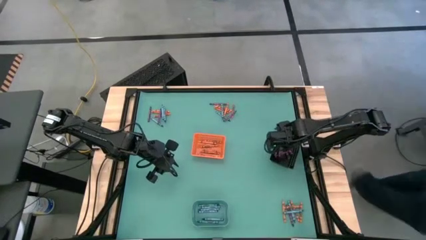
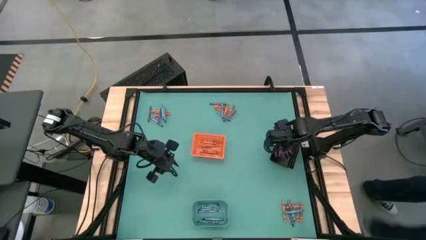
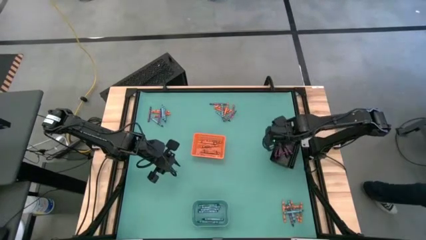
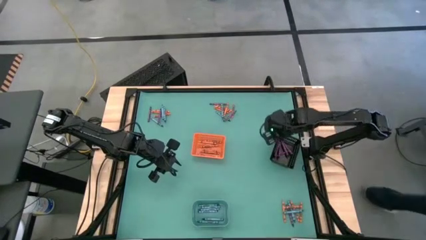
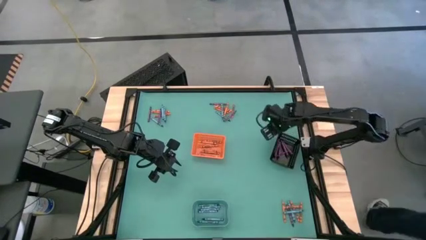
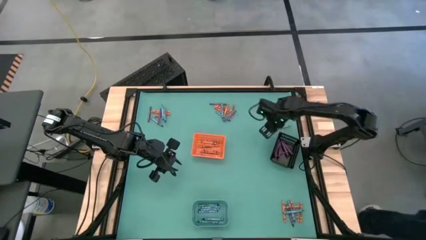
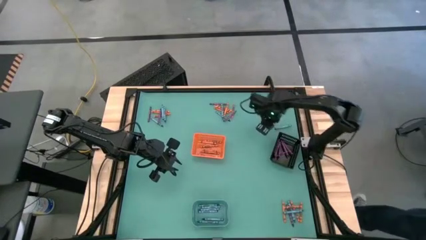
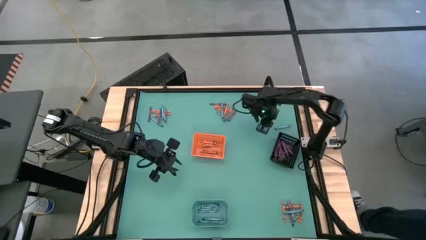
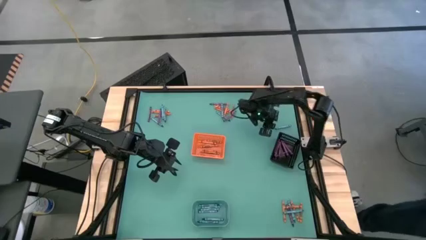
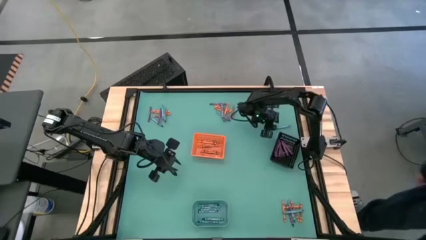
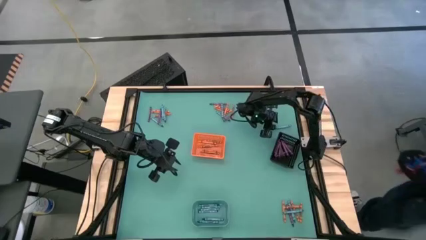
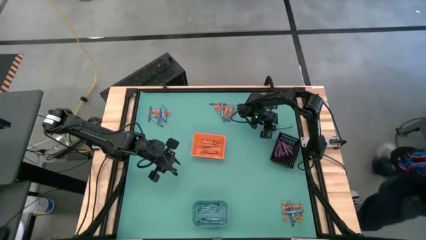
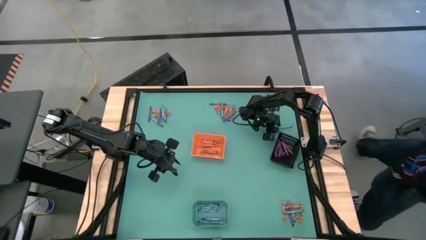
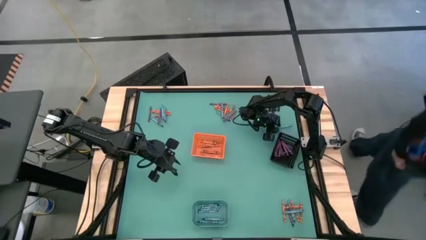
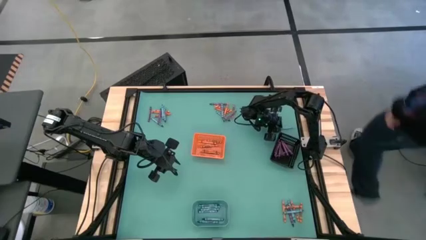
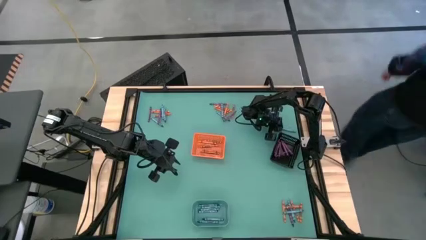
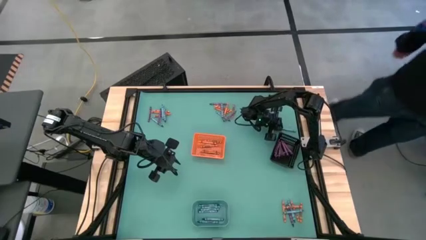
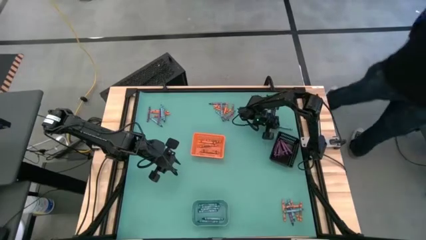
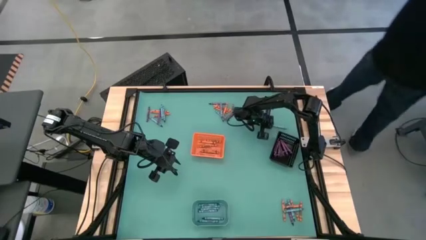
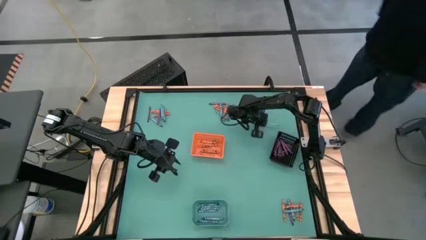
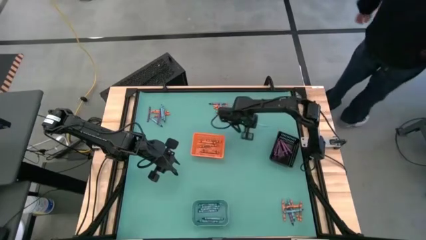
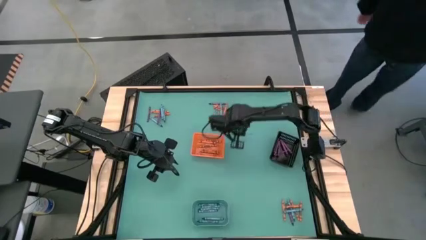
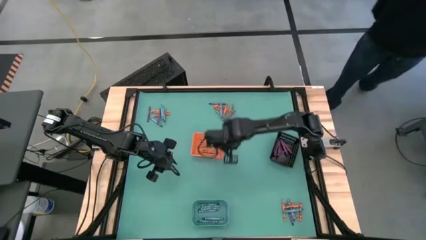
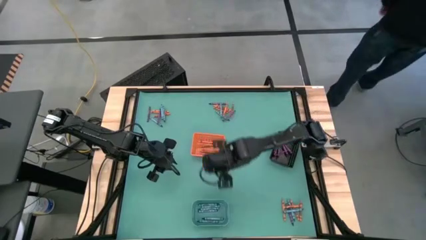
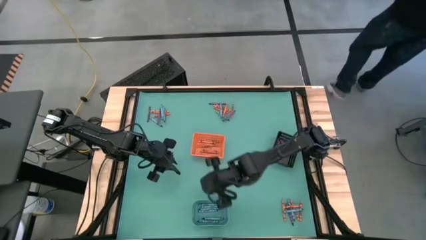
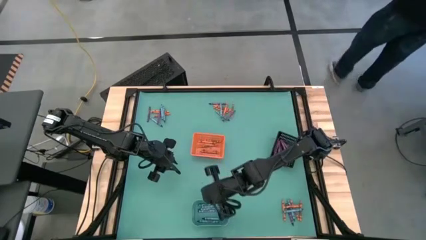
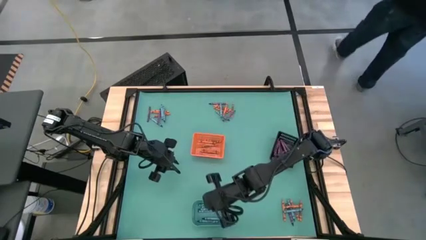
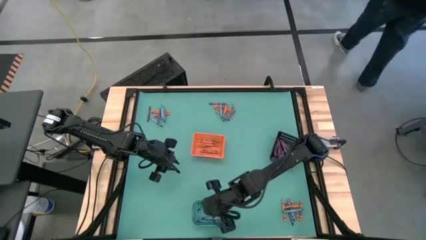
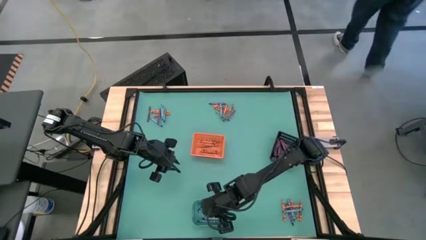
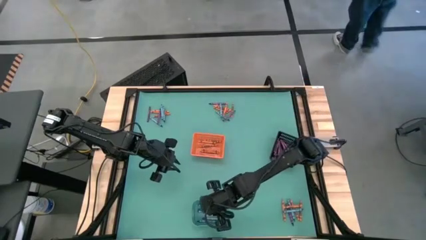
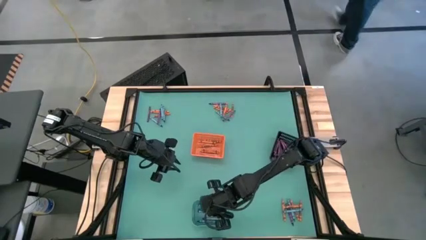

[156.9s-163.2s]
Task: Sort crayons
Put the blue crayon into the blue bin

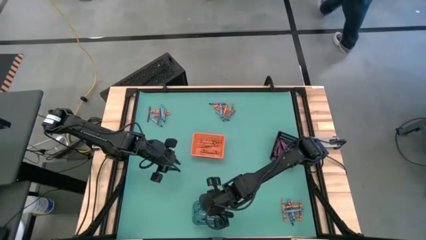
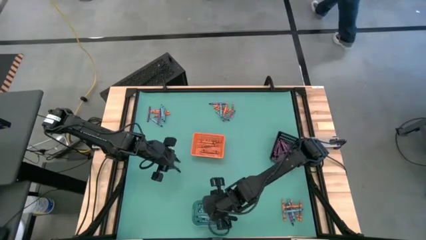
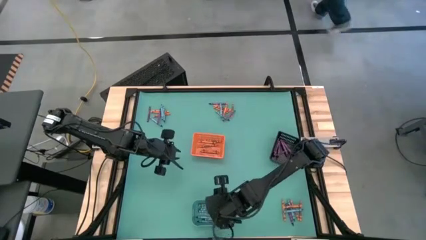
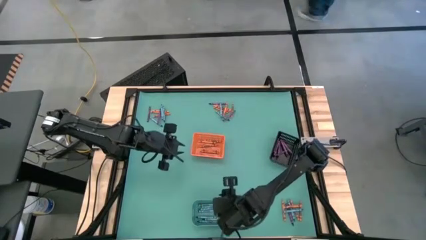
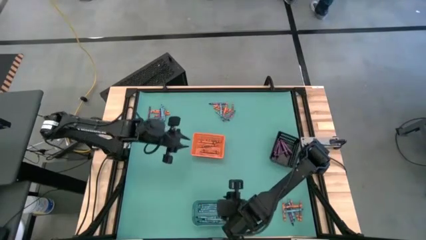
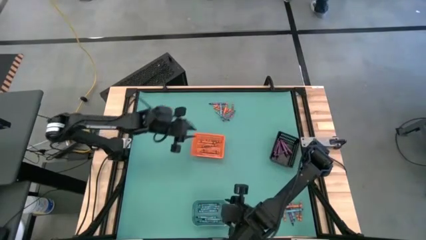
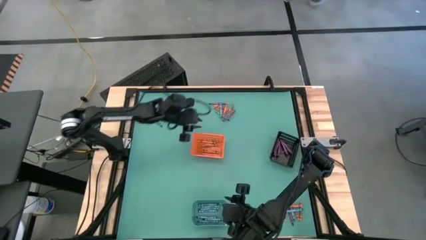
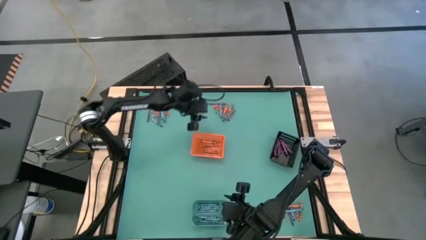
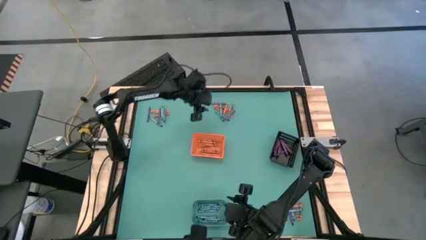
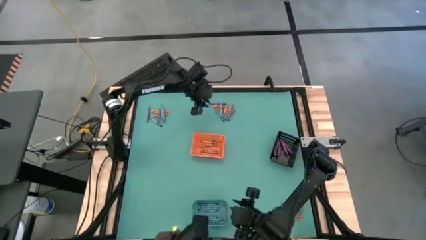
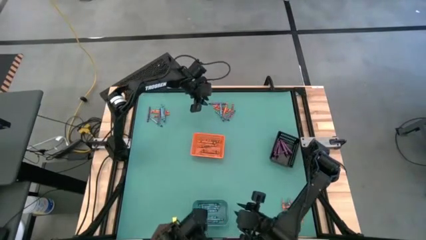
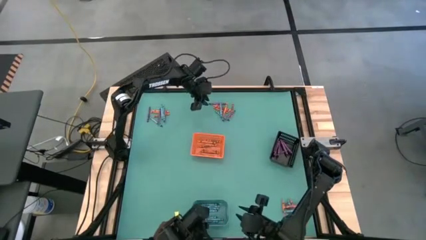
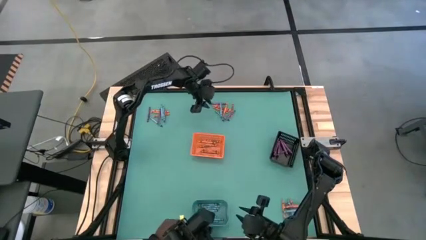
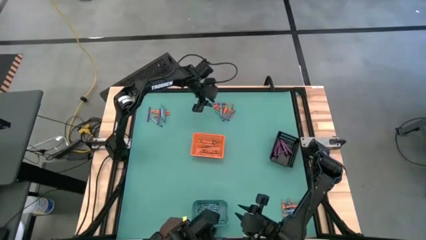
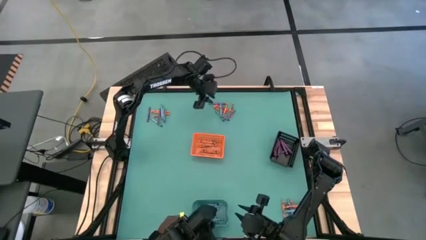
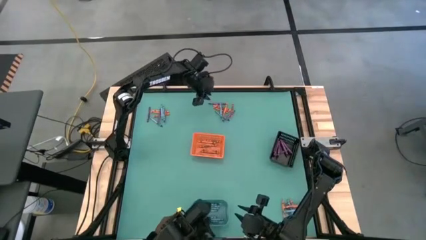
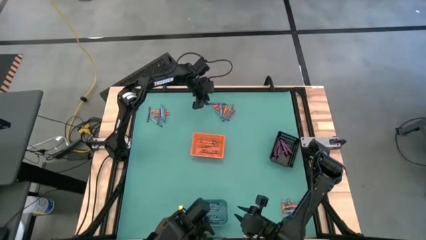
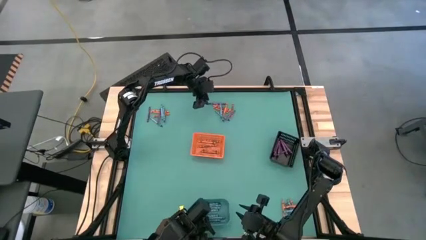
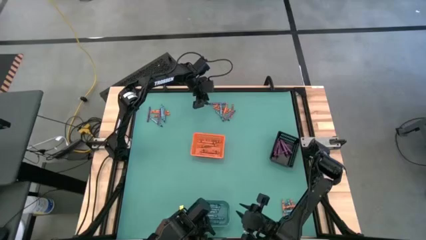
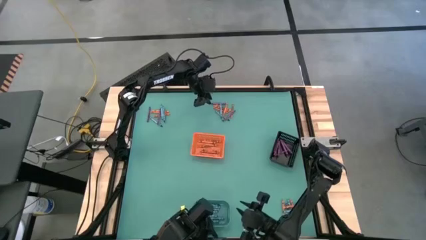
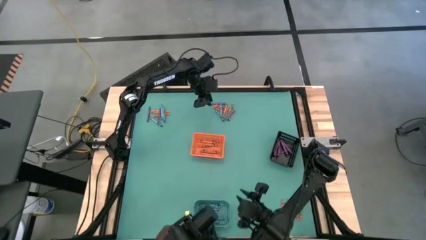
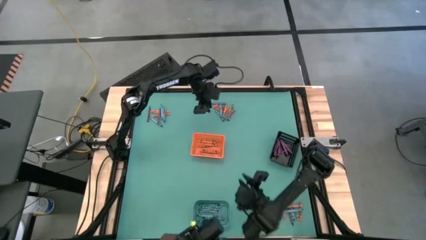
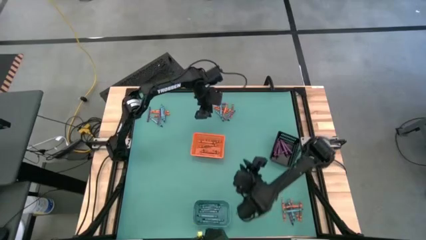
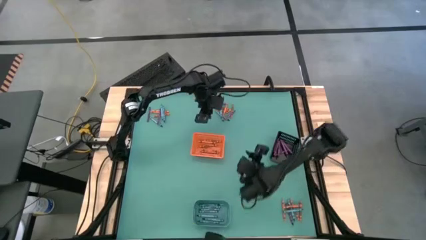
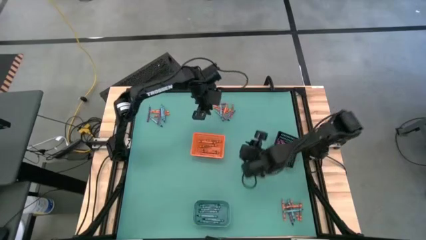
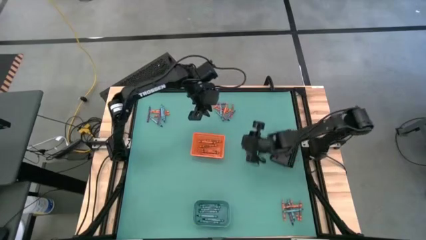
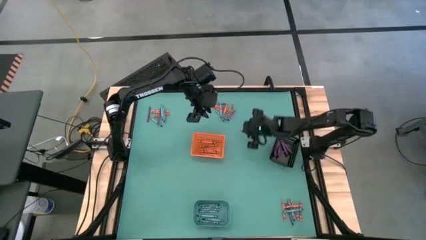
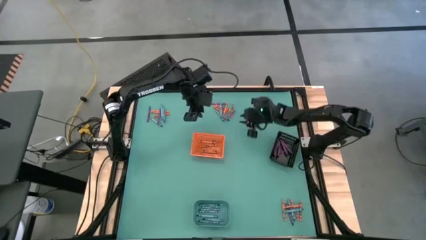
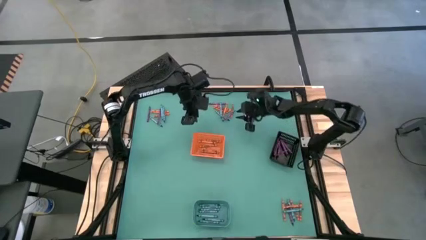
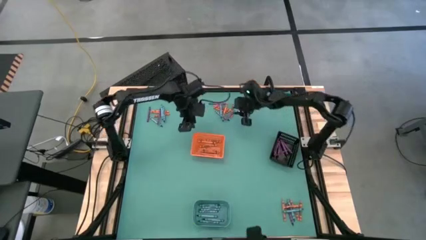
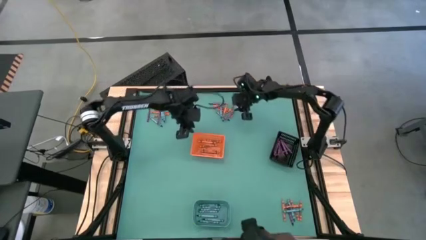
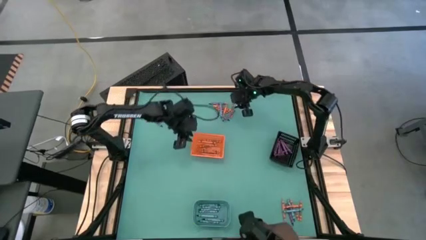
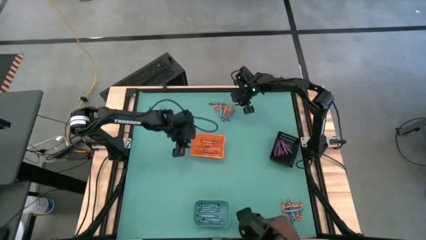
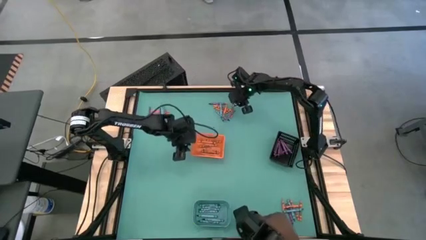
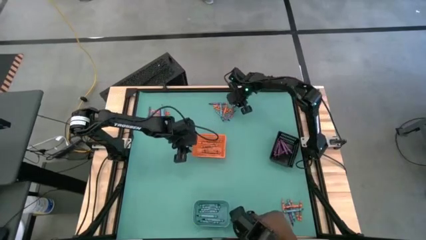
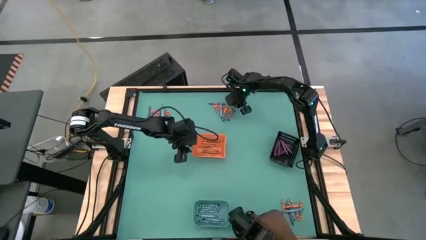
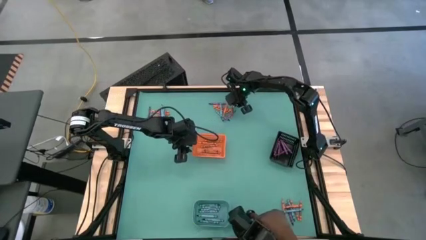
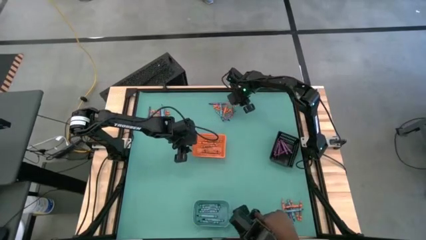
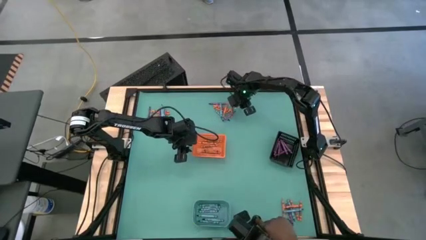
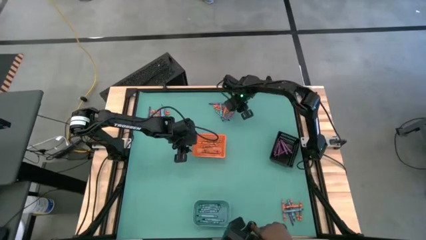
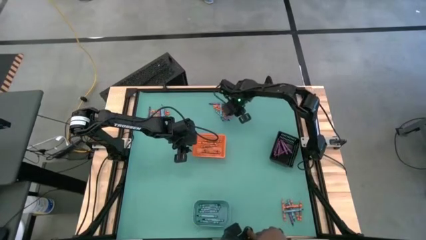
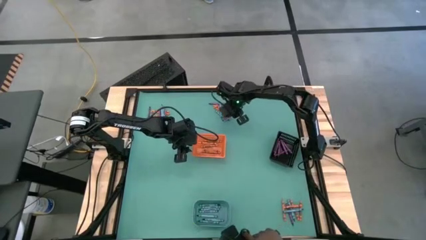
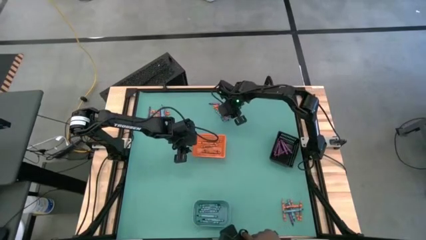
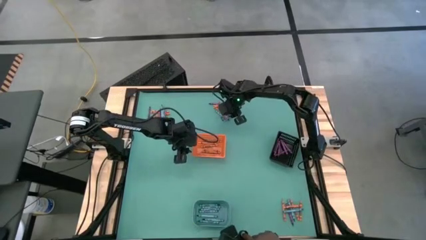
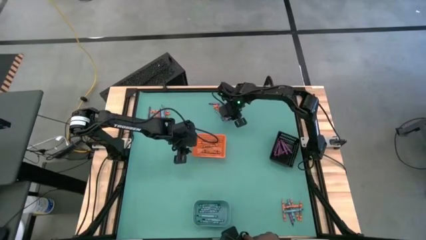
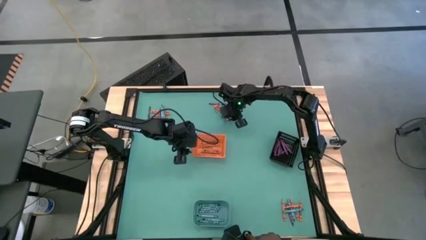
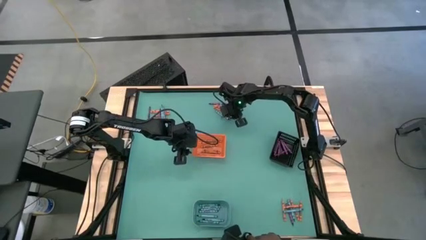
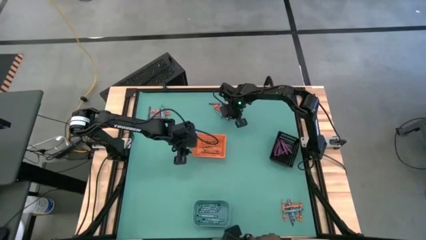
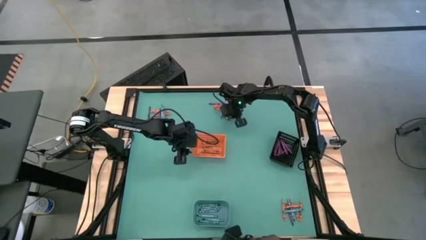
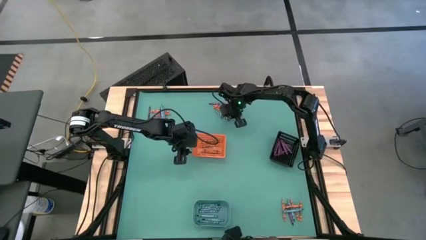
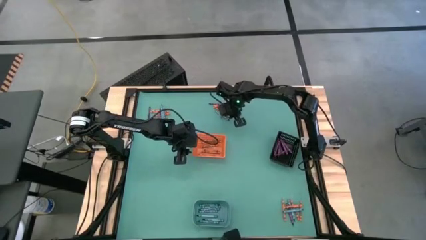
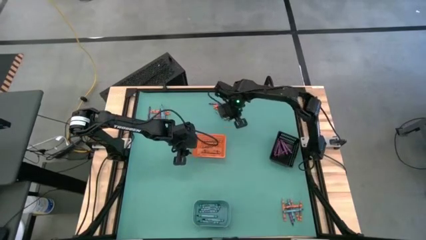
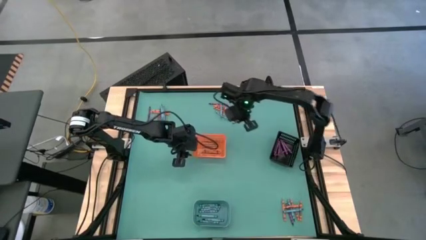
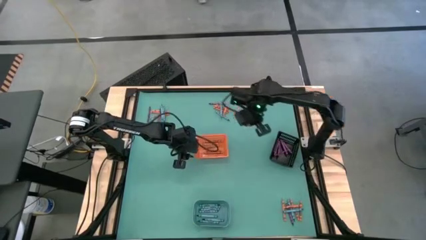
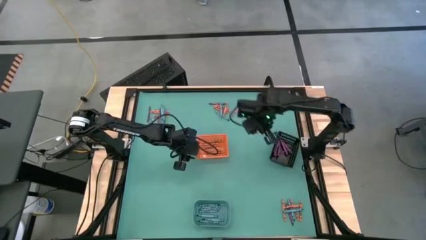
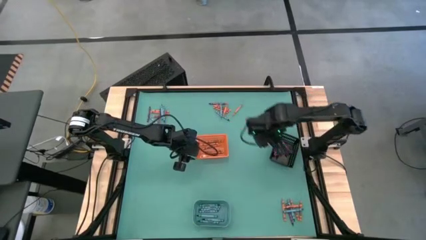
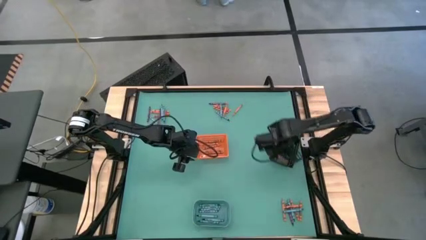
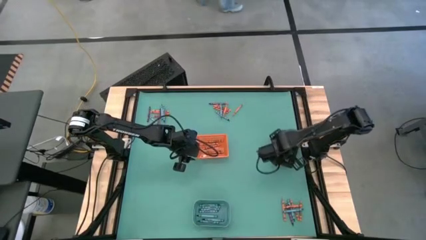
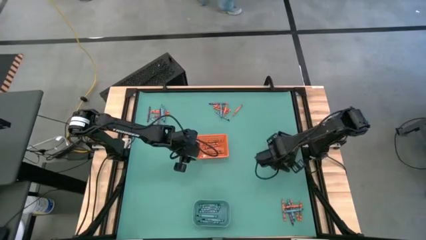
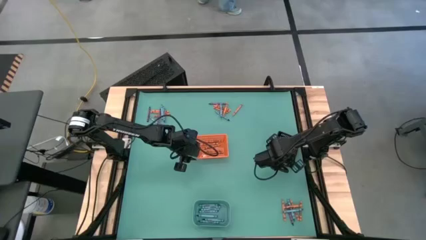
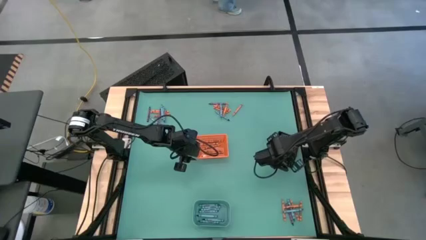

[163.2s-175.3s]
Put the purple crayon into the black bin
